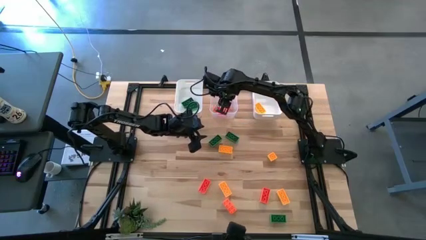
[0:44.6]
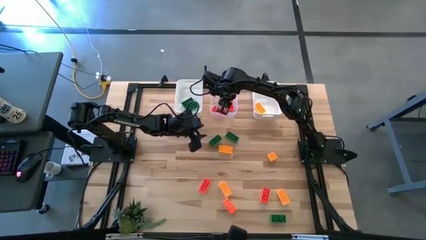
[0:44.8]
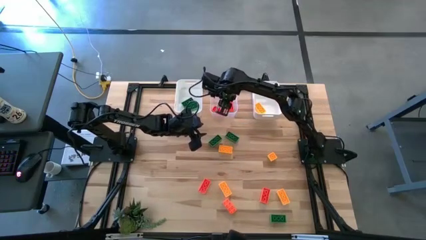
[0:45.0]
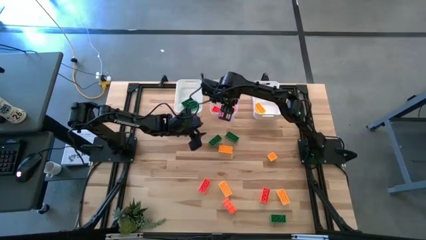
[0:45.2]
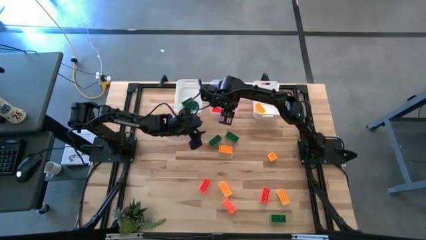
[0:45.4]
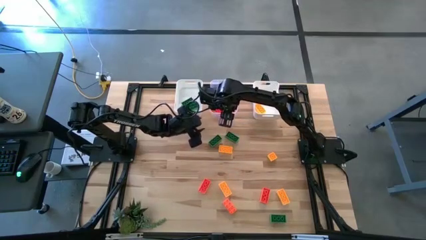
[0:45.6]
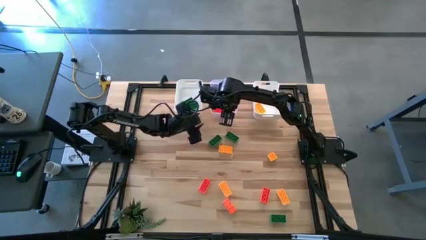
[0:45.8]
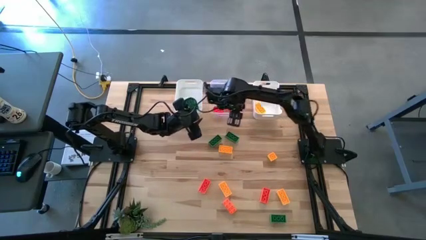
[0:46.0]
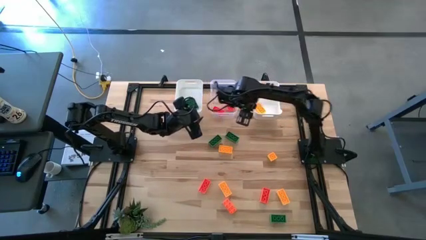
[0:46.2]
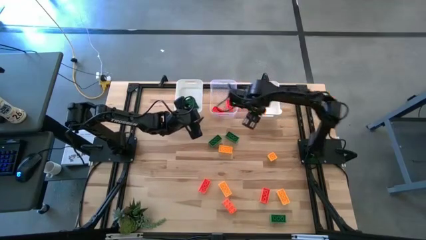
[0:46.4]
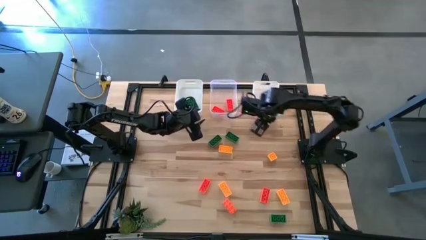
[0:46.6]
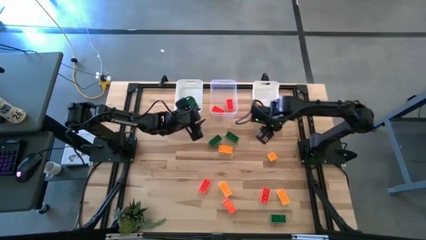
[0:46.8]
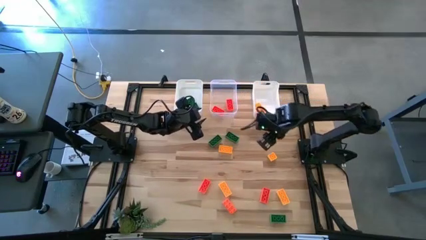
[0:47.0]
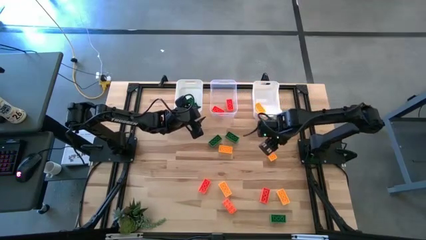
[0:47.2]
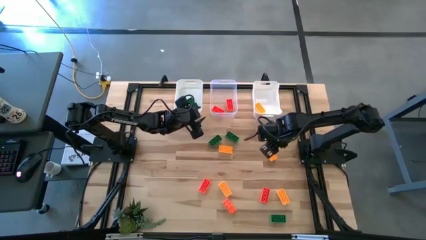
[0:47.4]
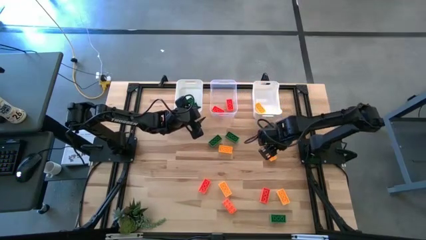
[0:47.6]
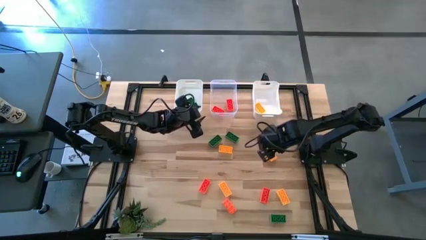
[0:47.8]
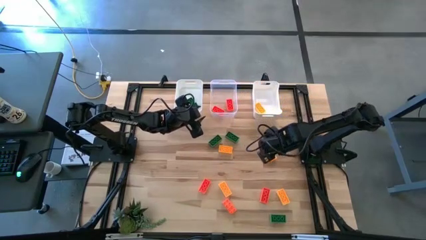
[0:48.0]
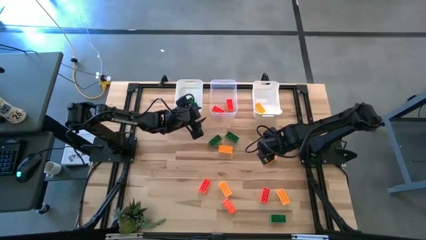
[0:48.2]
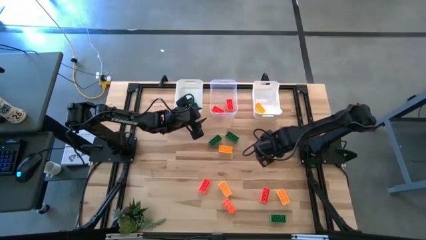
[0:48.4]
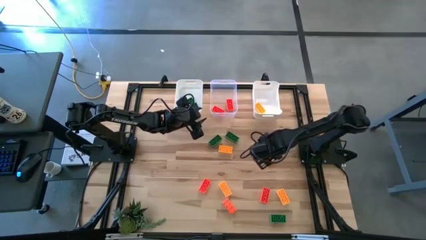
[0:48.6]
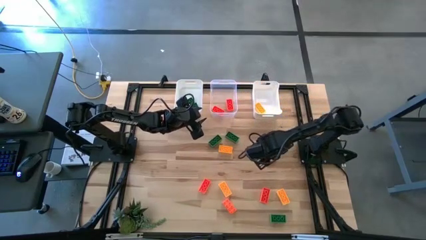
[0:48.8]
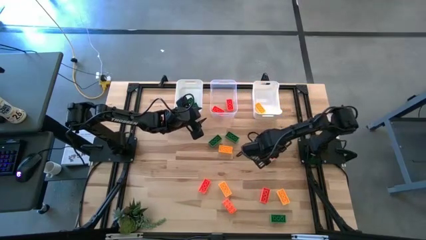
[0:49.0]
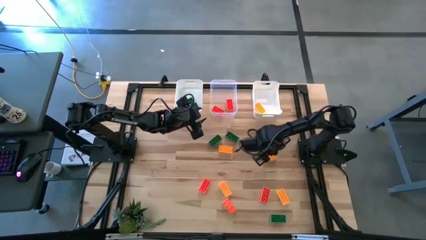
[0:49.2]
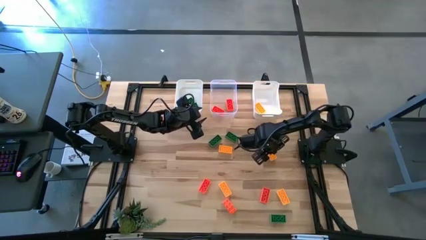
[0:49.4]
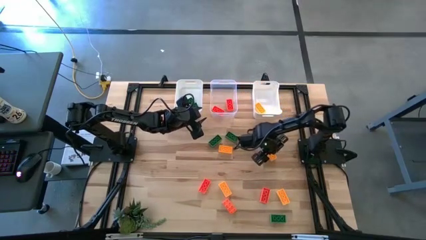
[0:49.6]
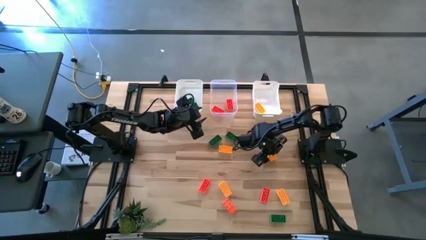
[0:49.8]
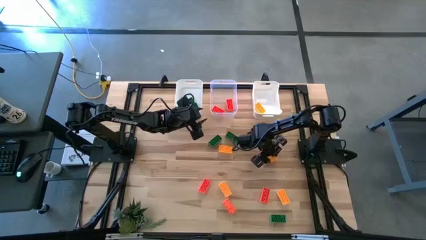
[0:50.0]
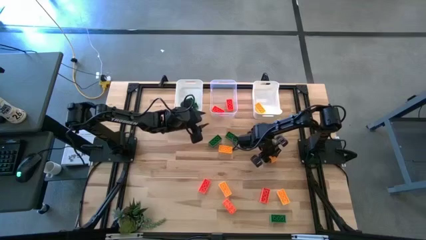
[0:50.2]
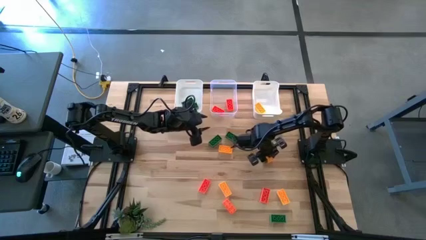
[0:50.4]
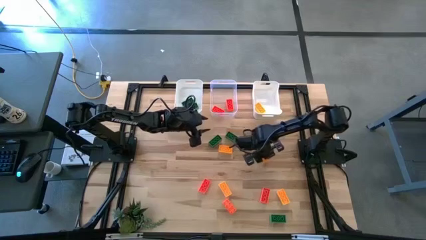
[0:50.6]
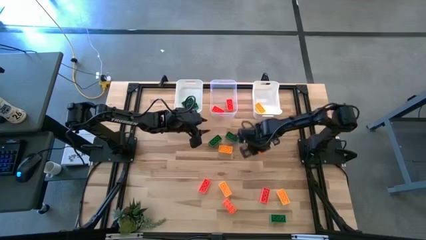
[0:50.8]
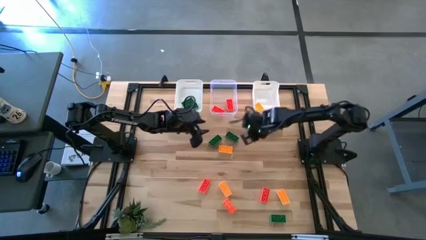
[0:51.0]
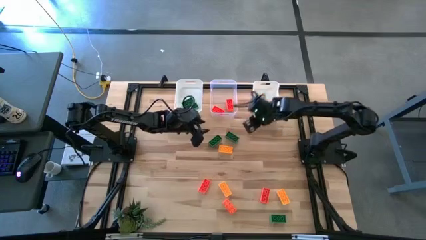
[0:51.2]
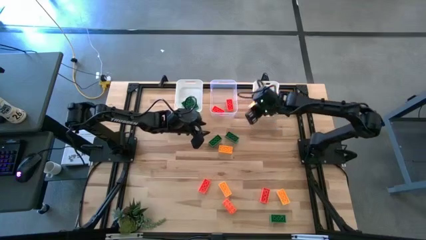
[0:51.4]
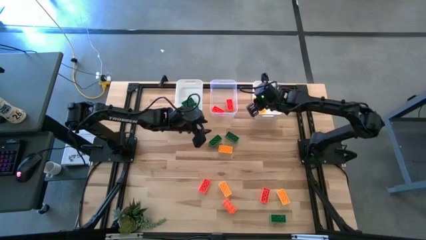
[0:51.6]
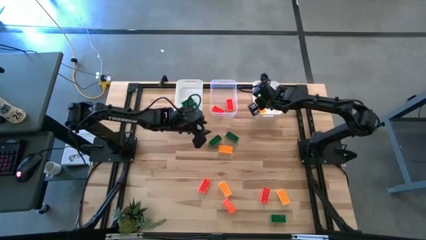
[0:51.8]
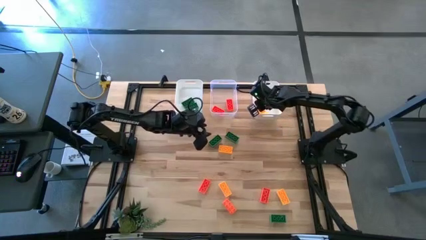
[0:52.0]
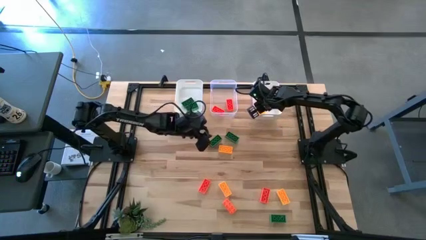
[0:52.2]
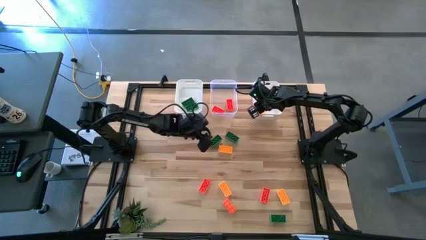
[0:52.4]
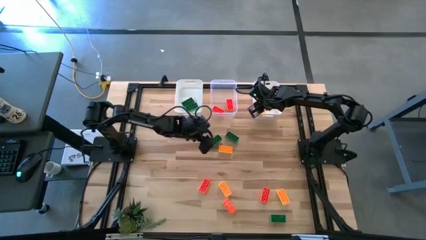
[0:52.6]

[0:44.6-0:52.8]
Task: Sort & place blocks by color
Put the yellow game piece into the right white bin

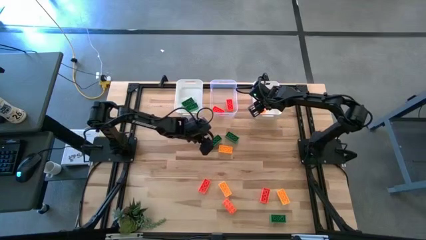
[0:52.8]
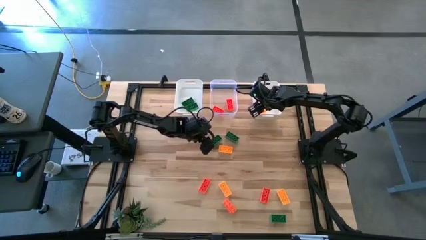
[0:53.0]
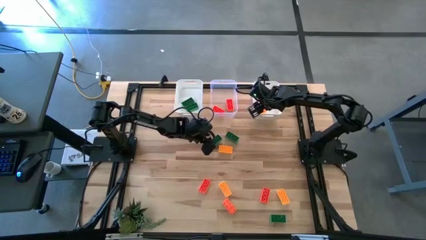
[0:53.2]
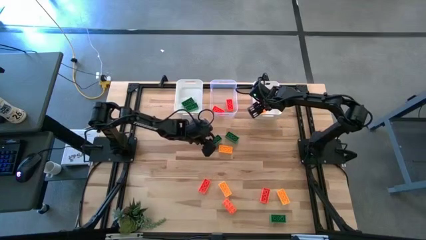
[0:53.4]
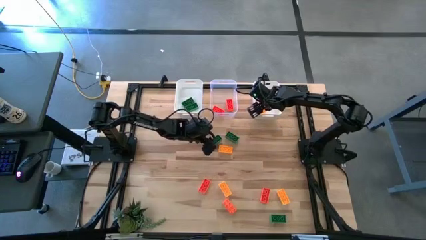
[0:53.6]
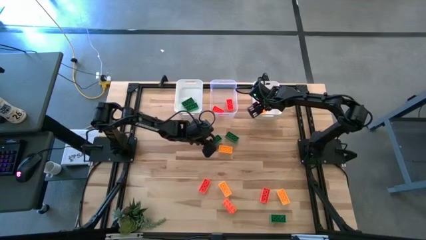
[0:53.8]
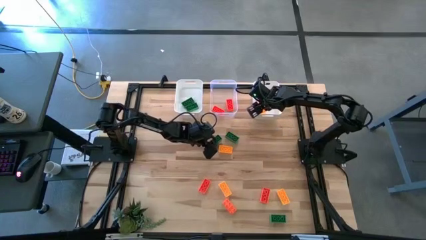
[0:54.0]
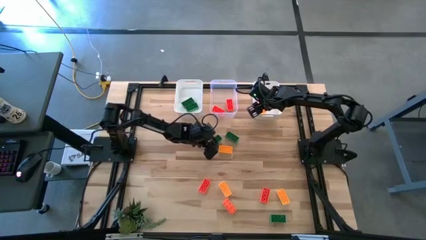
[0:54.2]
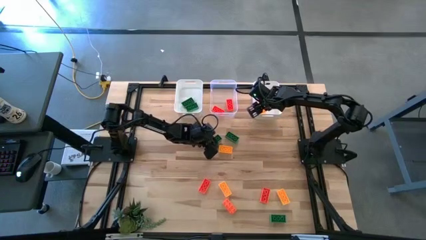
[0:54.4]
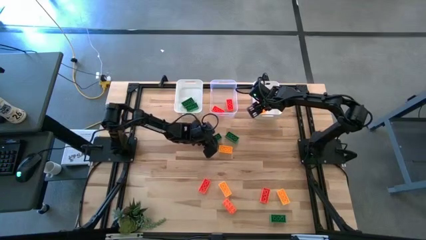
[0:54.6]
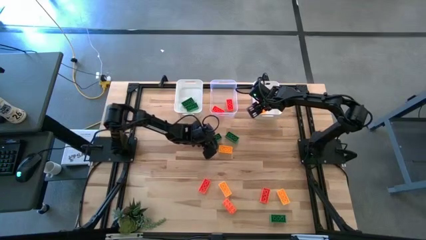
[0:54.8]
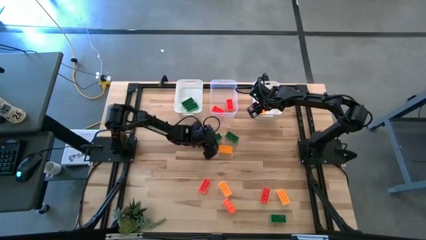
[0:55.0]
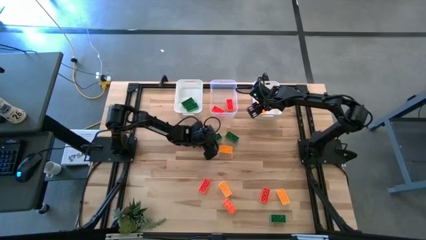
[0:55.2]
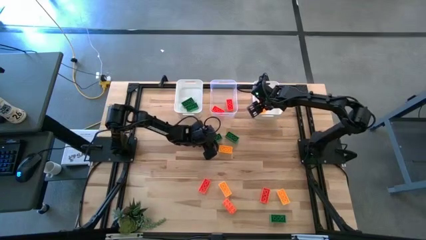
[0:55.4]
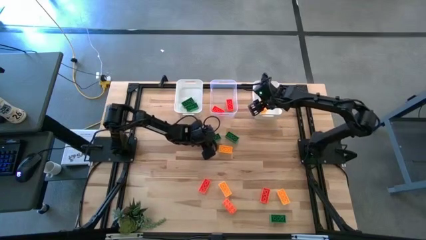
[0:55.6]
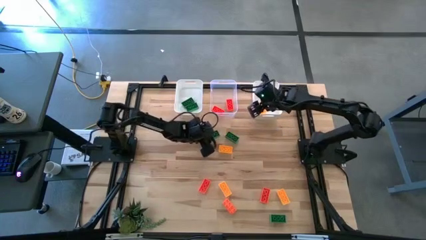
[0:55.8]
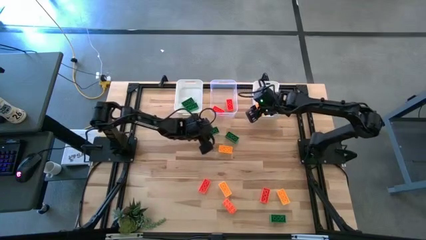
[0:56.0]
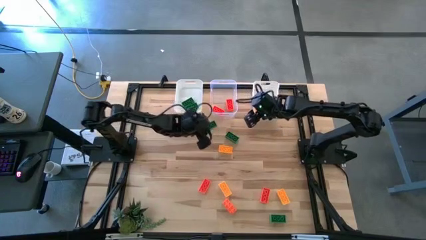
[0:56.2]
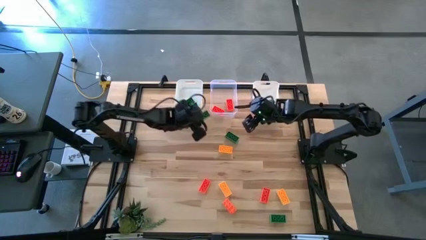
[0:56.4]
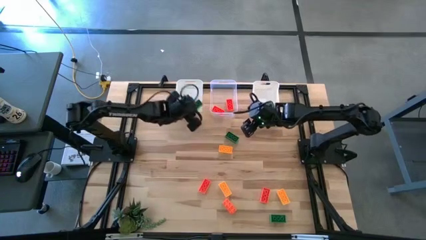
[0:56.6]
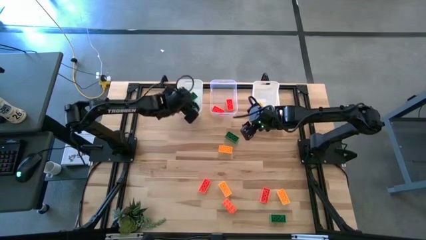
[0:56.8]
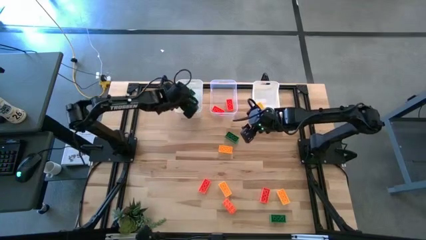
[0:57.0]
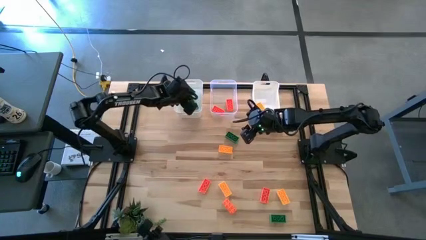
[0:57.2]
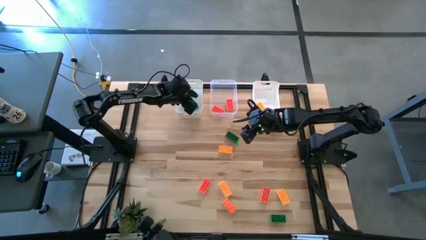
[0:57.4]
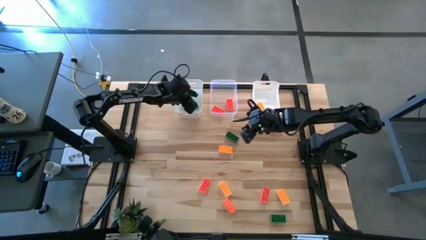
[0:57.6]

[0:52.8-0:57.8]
Put the green game piece into the left white bin

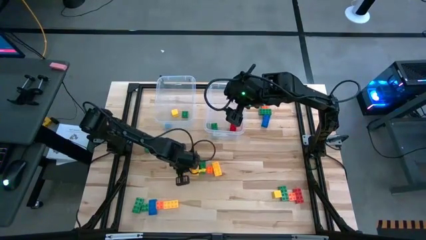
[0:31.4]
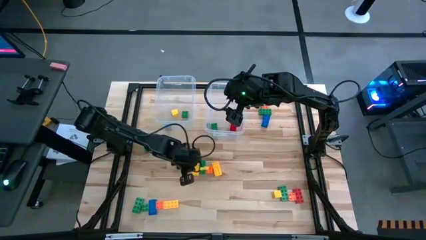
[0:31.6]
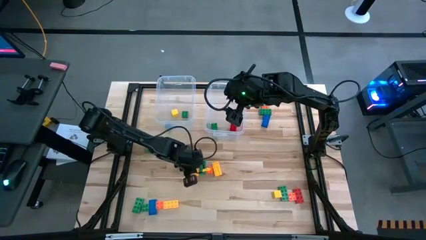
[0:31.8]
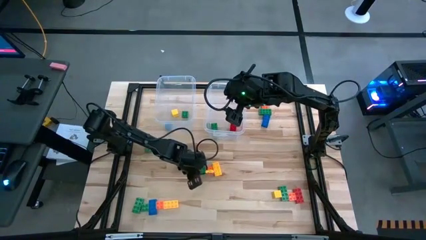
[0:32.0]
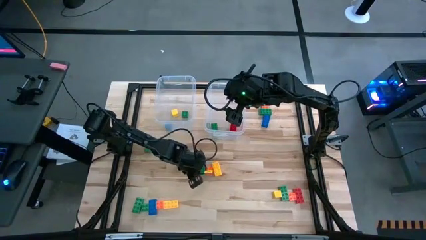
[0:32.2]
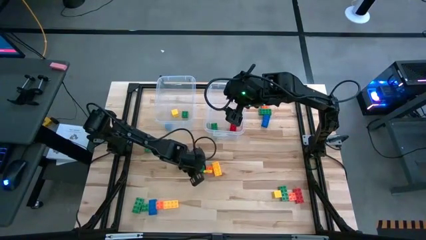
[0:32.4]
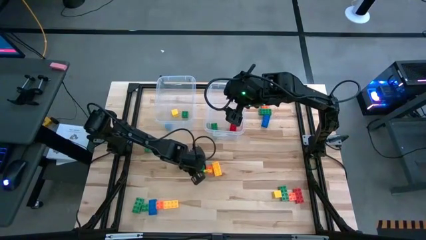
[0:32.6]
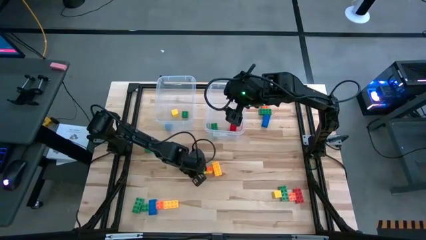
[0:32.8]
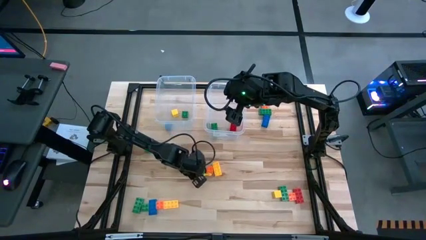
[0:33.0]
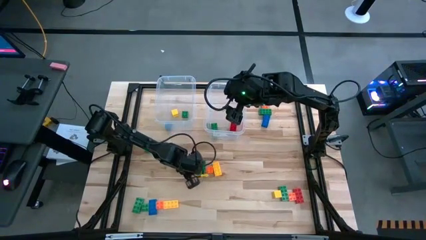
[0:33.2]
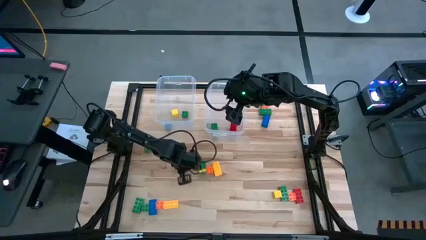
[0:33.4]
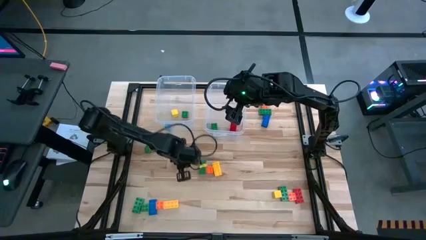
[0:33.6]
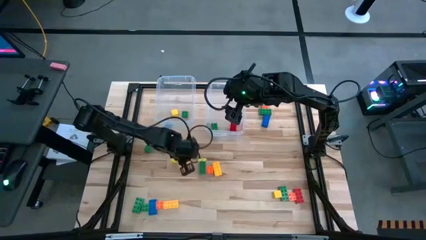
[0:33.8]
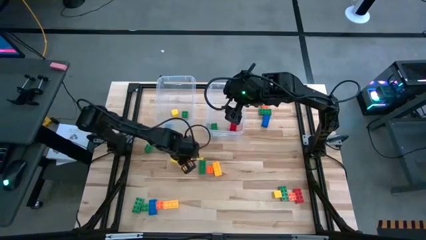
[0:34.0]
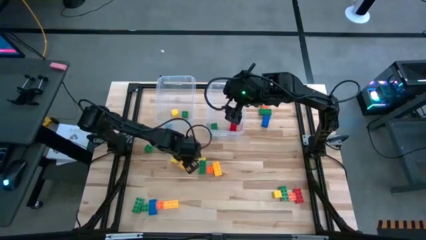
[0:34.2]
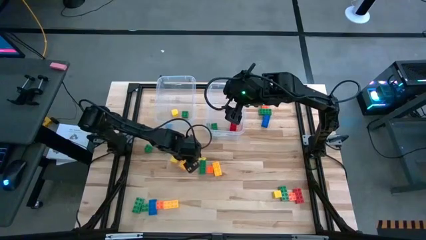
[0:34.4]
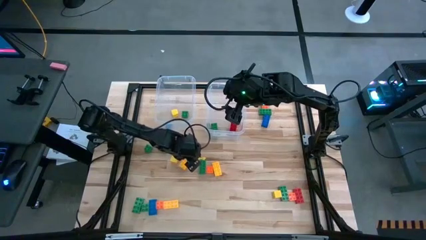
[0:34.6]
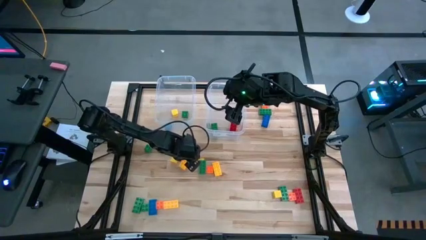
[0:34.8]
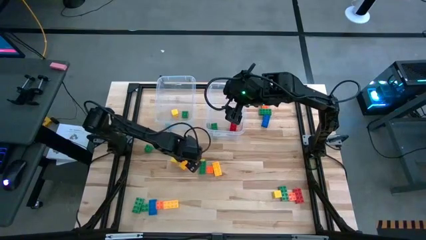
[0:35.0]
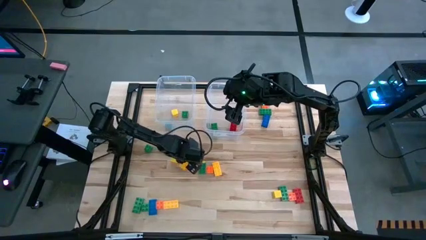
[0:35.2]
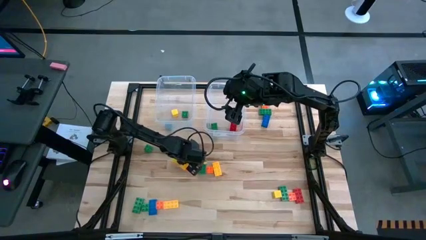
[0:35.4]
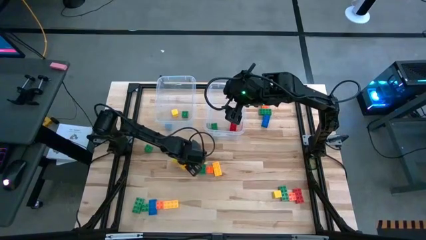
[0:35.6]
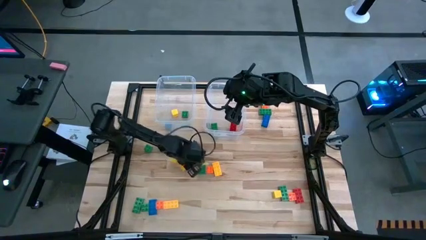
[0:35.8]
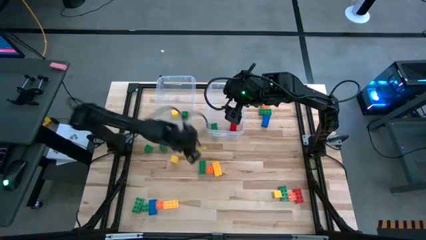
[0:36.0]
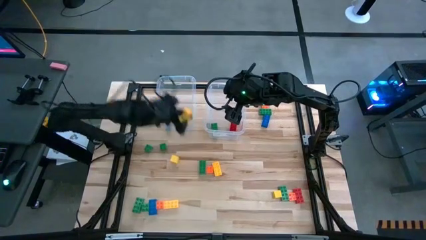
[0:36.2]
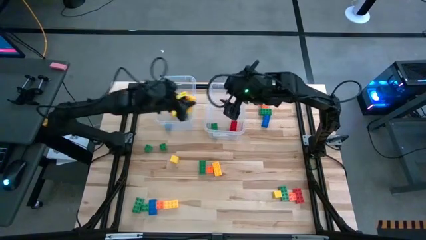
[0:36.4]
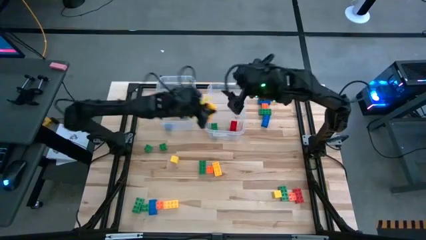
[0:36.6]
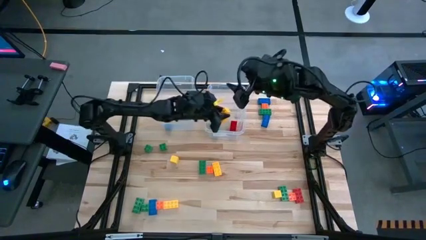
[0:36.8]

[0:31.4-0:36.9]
Task: Sort blocks by size
Put the yellow big game piece into the right transparent bin
